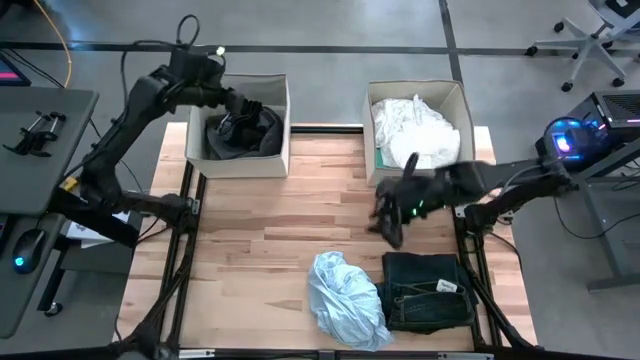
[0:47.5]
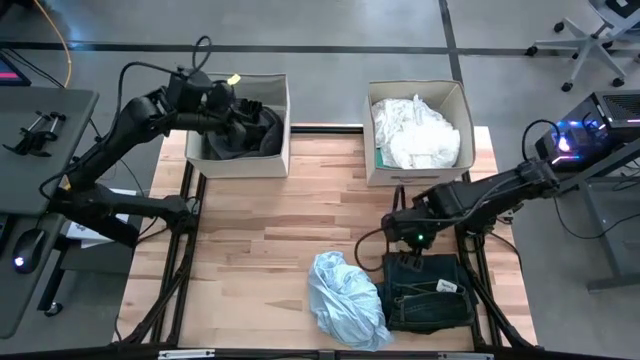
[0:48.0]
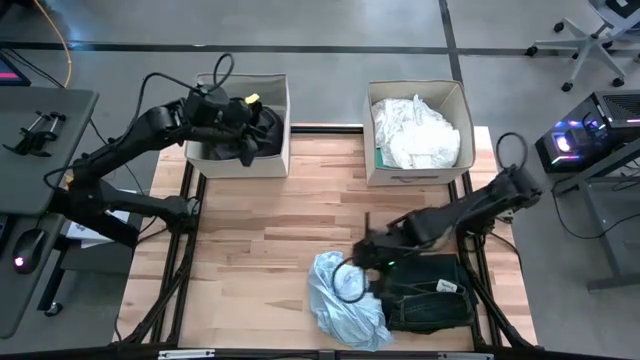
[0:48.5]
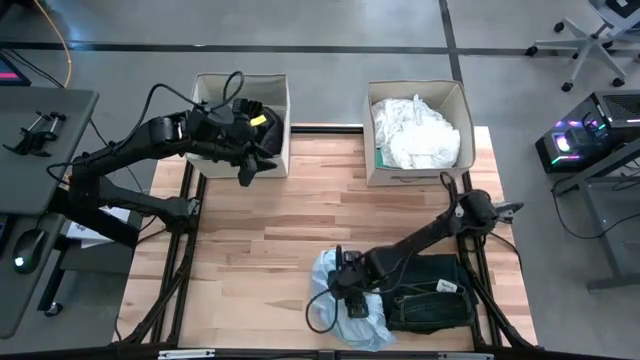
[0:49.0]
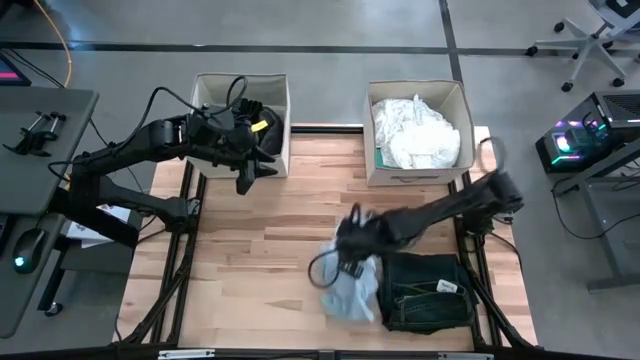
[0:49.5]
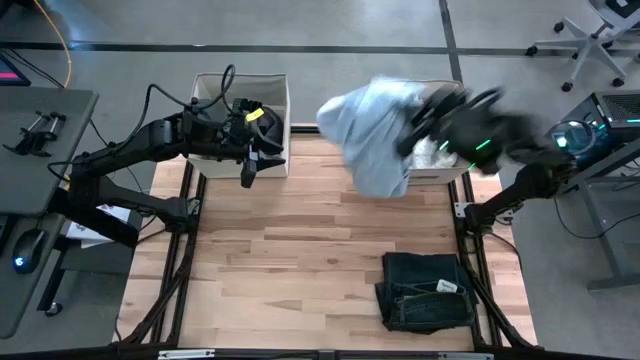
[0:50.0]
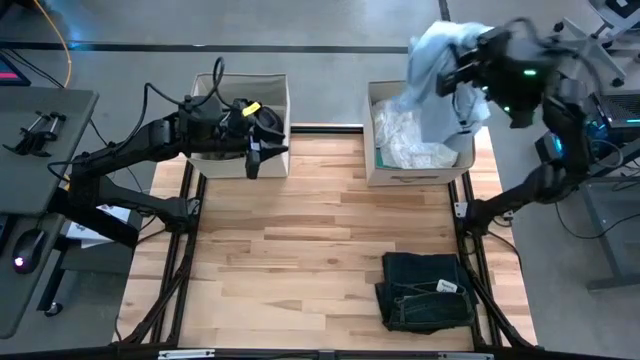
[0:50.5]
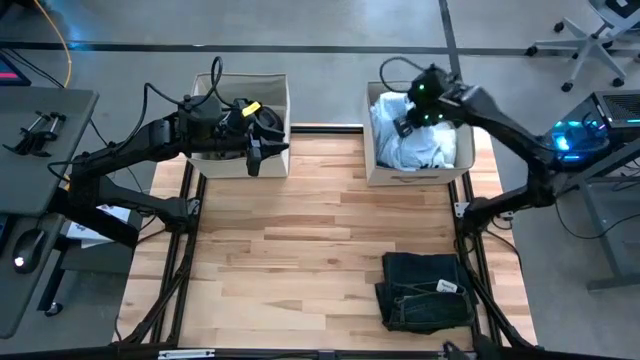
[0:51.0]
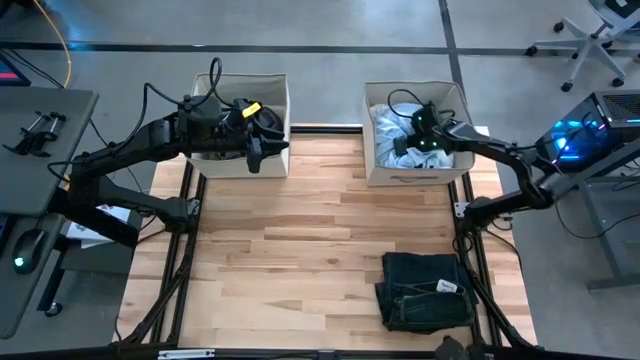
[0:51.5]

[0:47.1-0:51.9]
Task: Sort clothes
Put the light blue patterned patient gown into the right laundry organizer

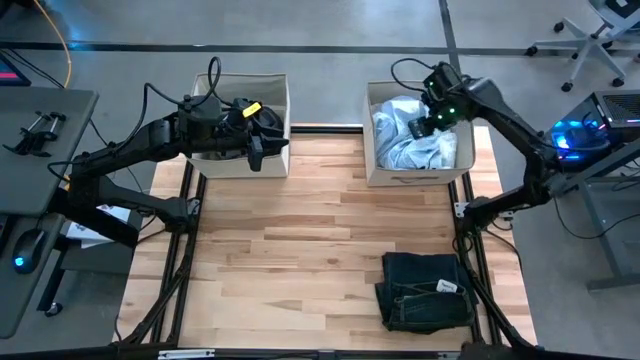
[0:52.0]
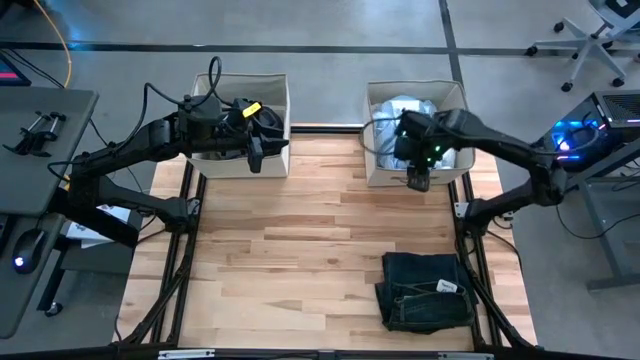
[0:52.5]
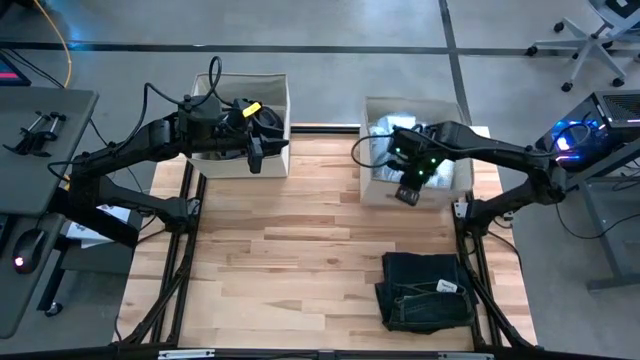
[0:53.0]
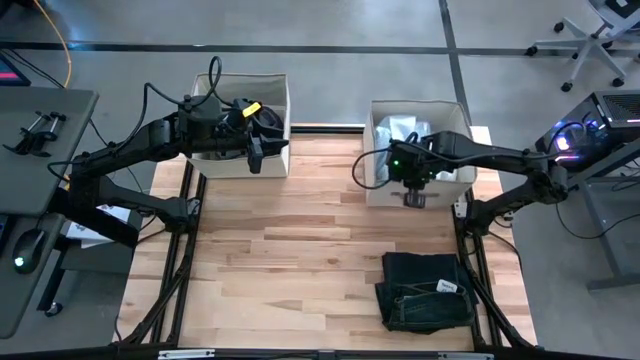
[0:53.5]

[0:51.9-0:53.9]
Adjust the right laundry organizer

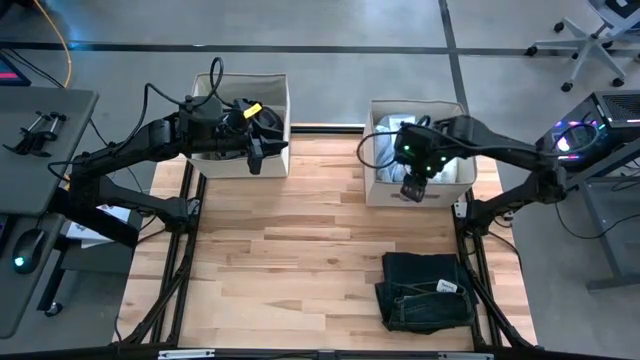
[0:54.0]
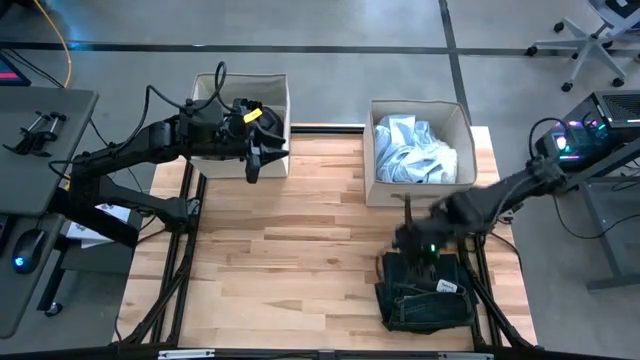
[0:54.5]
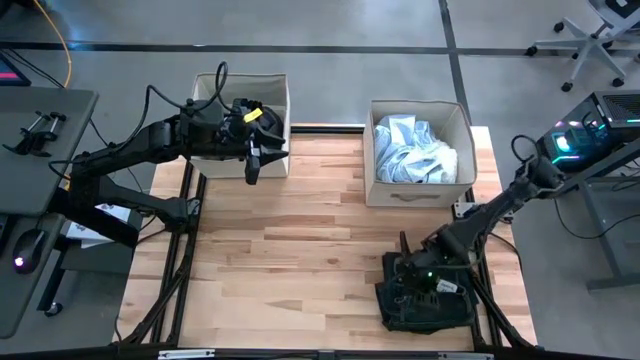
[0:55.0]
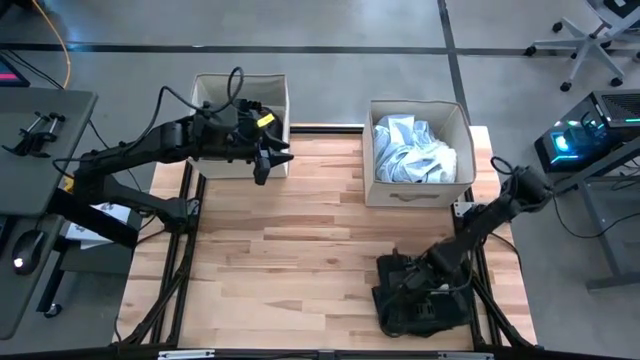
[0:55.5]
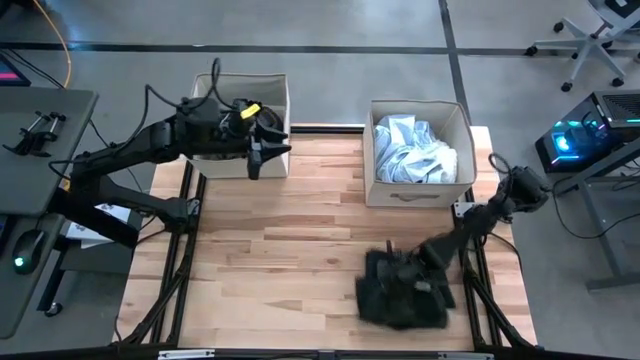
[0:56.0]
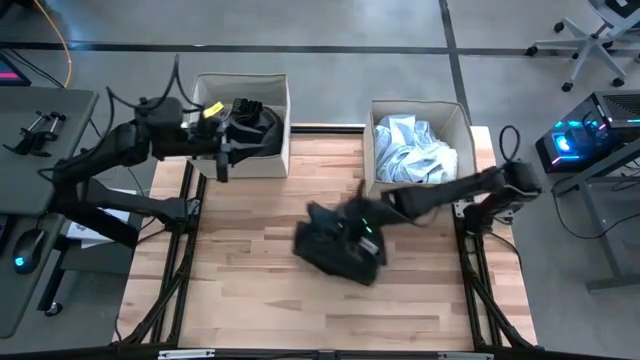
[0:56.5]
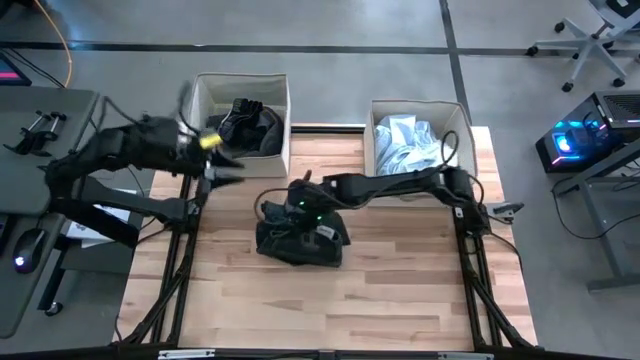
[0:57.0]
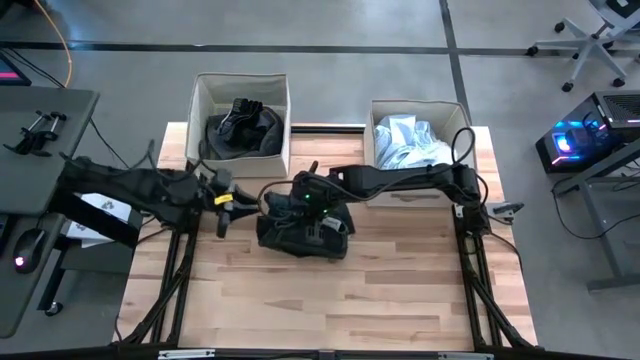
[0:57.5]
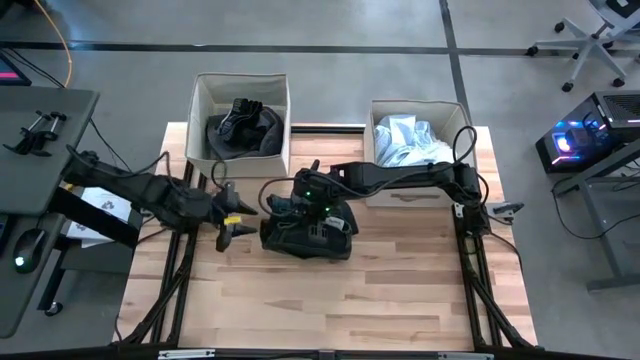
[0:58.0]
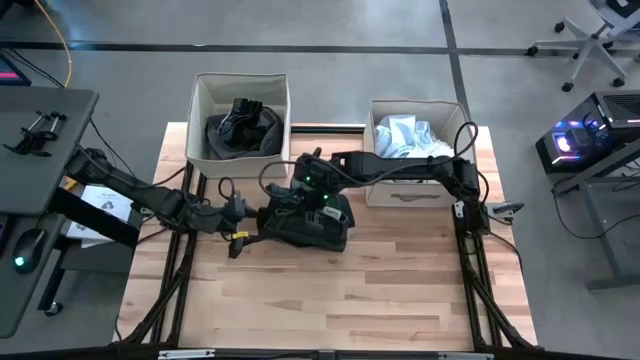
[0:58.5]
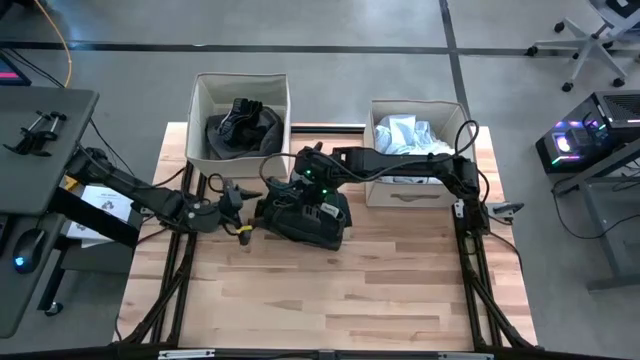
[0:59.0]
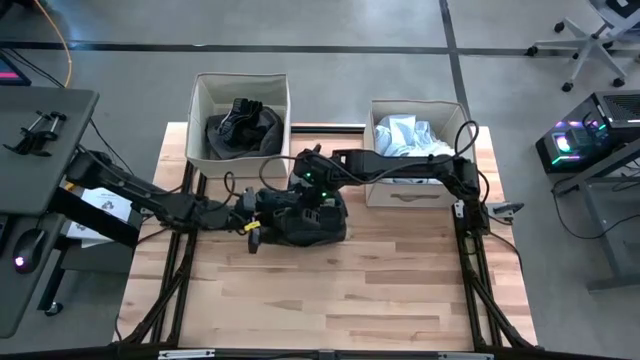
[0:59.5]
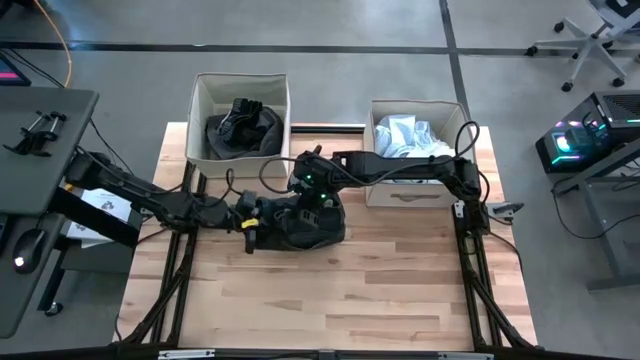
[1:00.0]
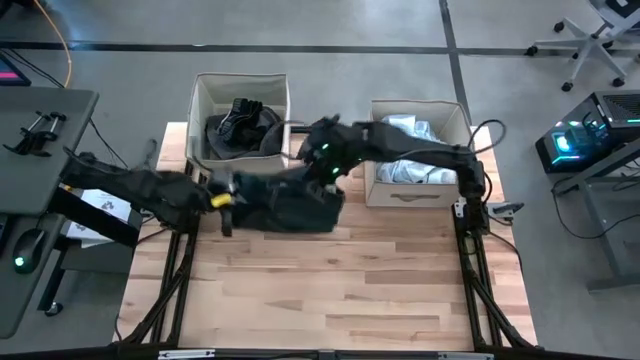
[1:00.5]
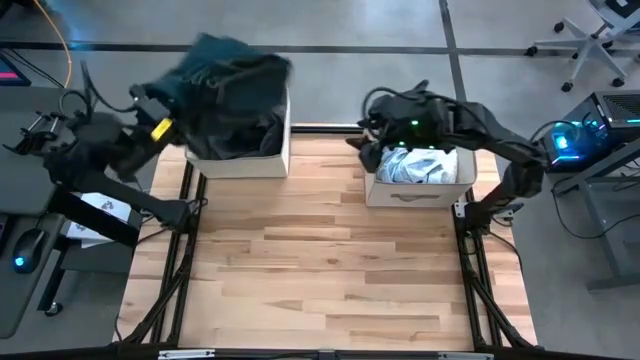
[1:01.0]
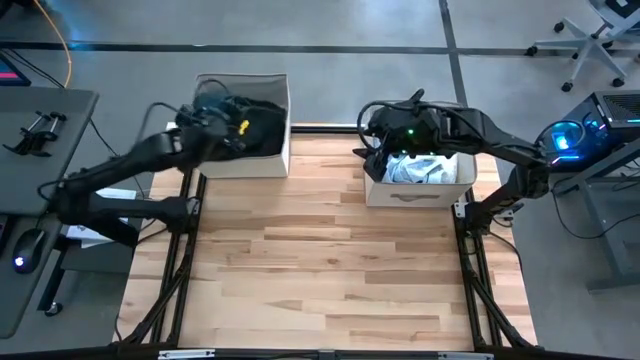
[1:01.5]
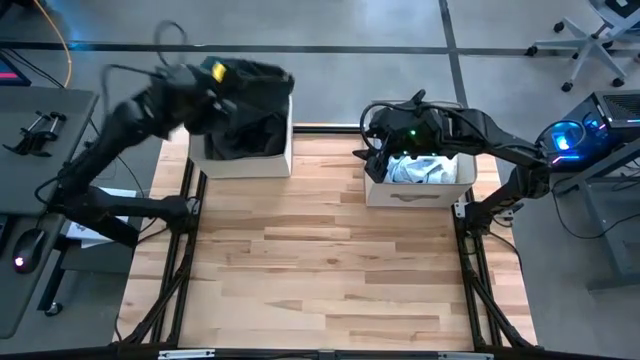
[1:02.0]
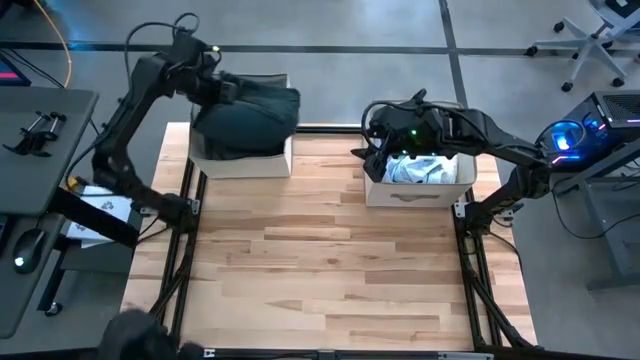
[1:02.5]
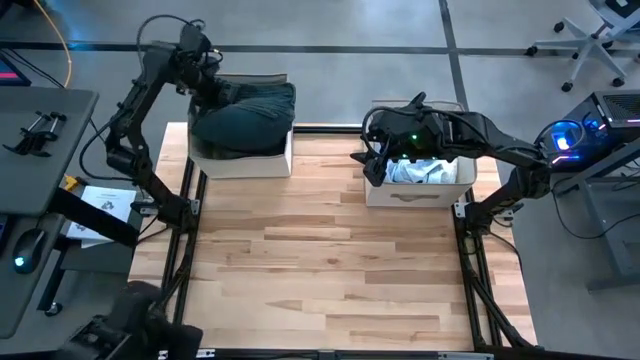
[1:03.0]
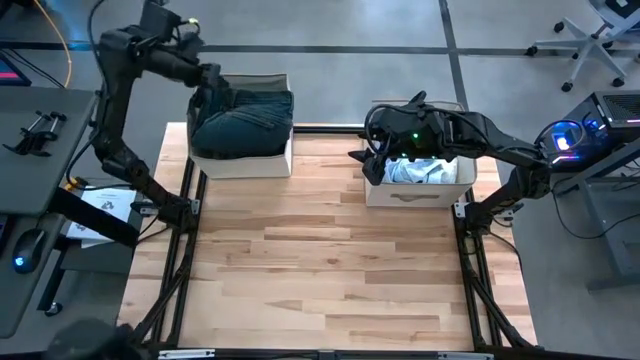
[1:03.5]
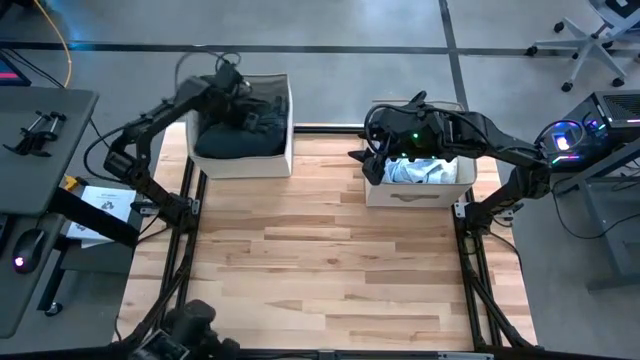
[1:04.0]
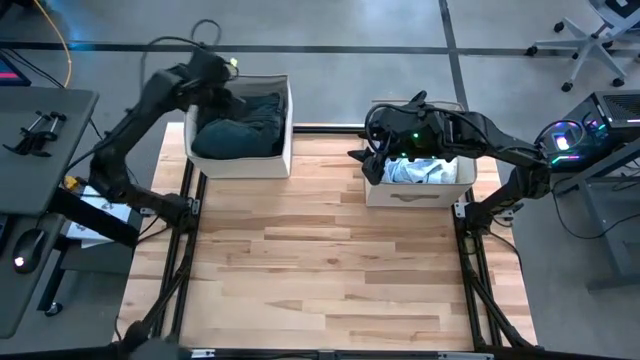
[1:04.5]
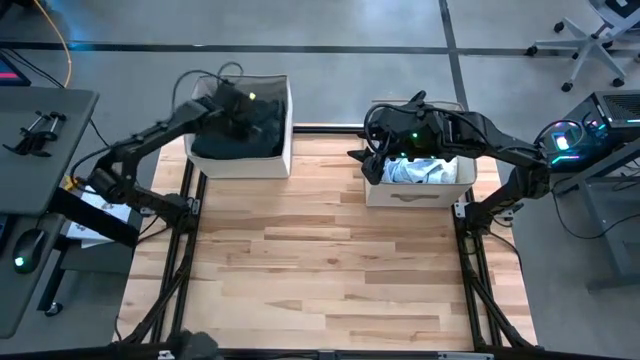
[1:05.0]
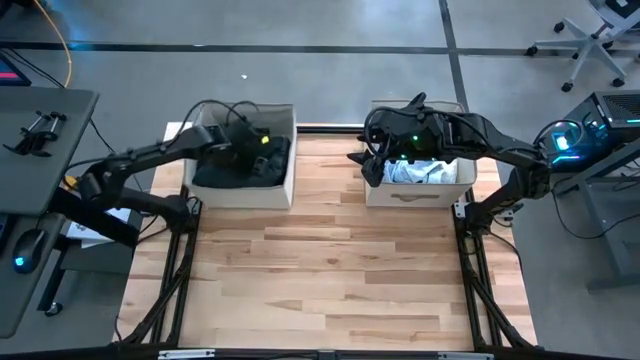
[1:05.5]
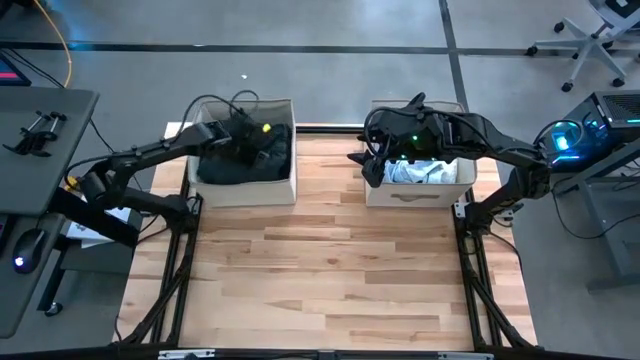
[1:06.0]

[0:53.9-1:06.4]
Put the dark blue pants into the left laundry organizer

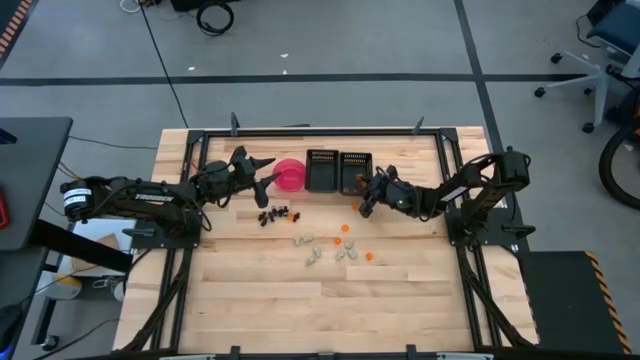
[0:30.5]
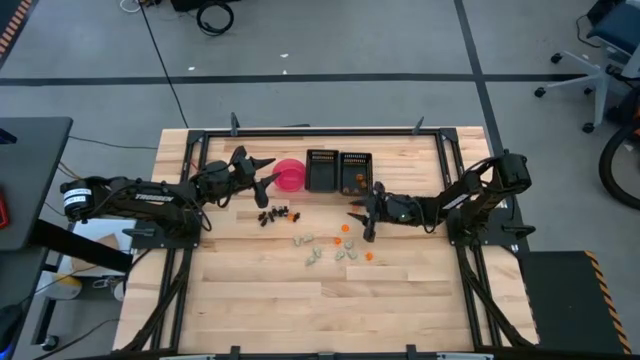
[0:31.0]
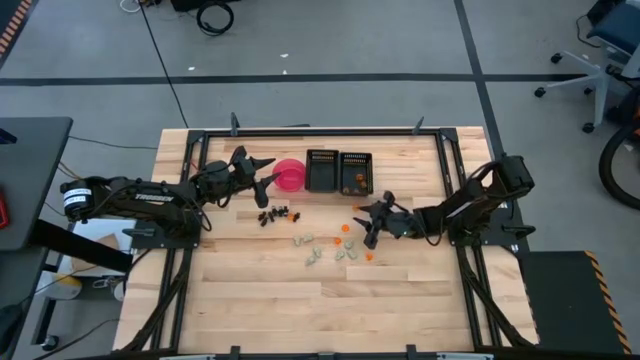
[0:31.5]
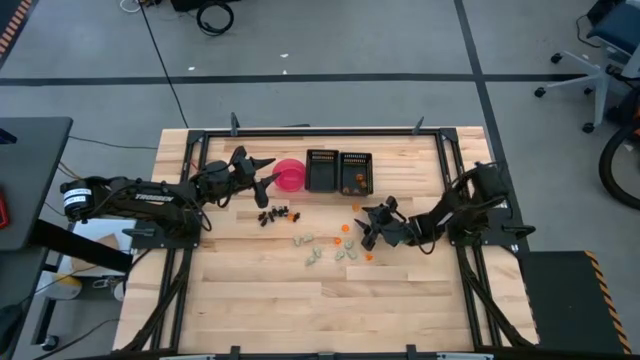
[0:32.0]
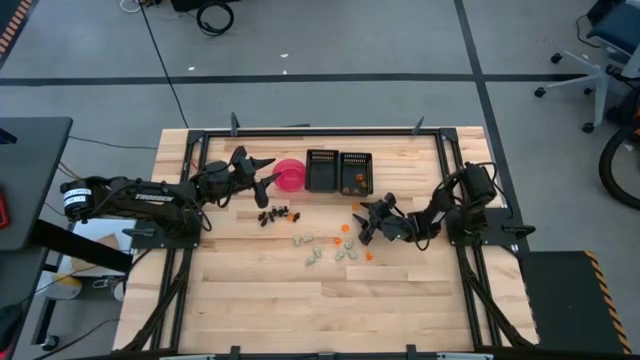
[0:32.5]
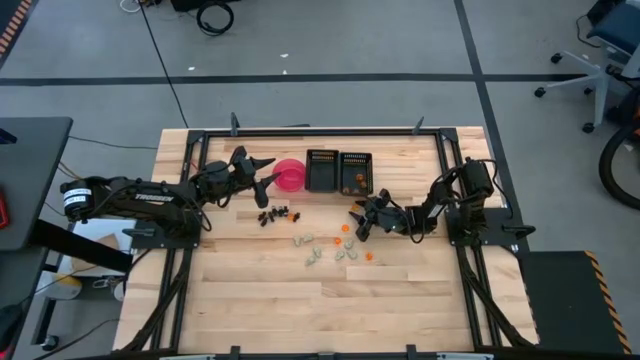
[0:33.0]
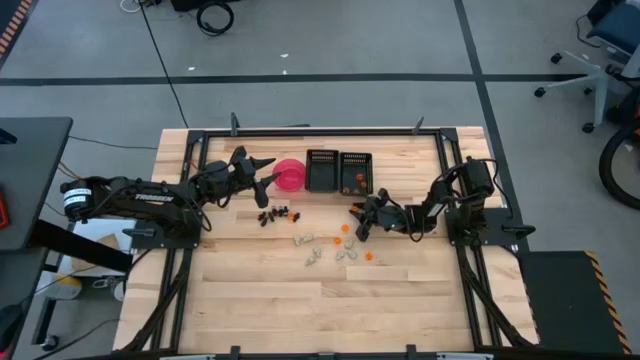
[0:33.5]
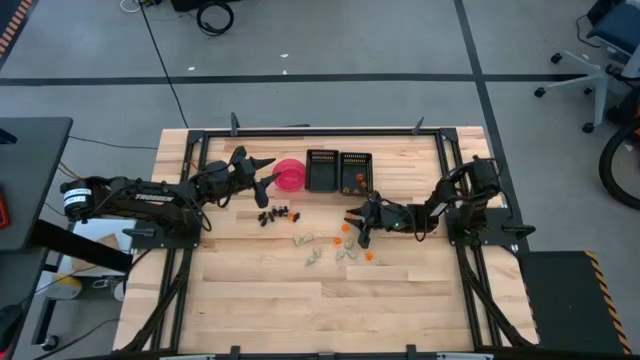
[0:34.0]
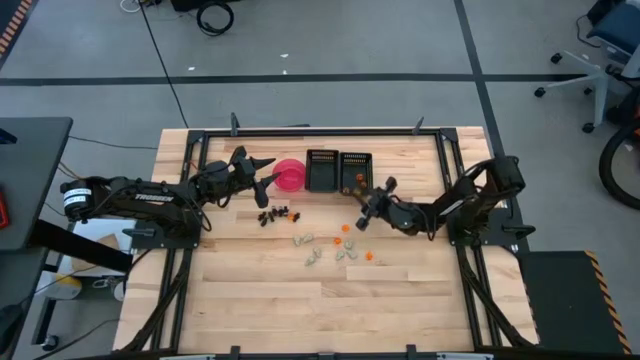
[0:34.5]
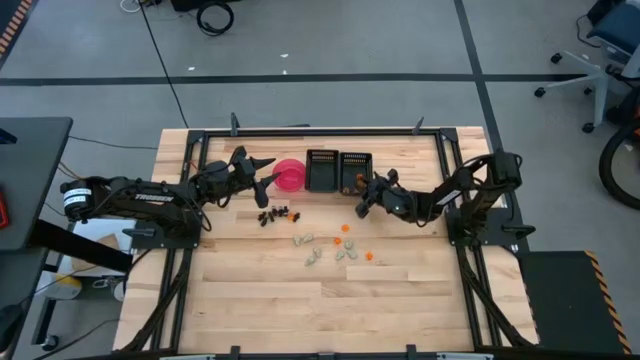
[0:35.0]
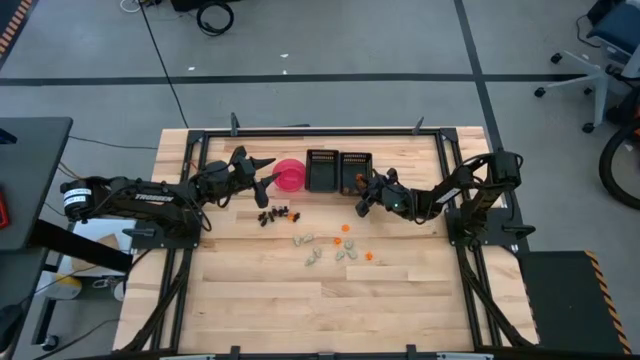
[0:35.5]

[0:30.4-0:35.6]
Task: Sort Halloween decoration
Put the orange pumpkin toy into the right black bin
